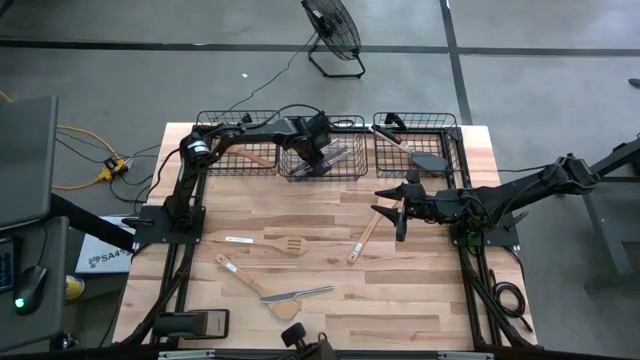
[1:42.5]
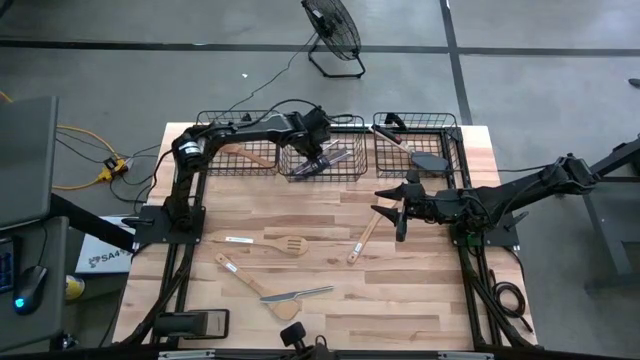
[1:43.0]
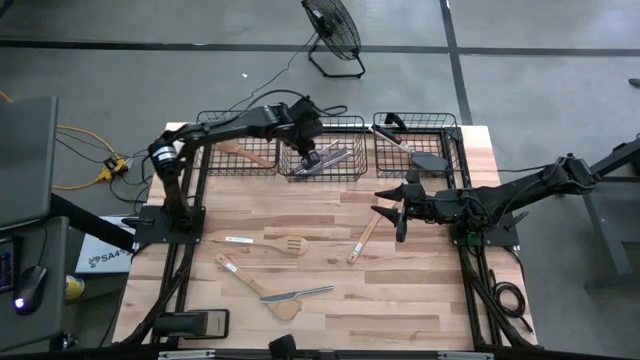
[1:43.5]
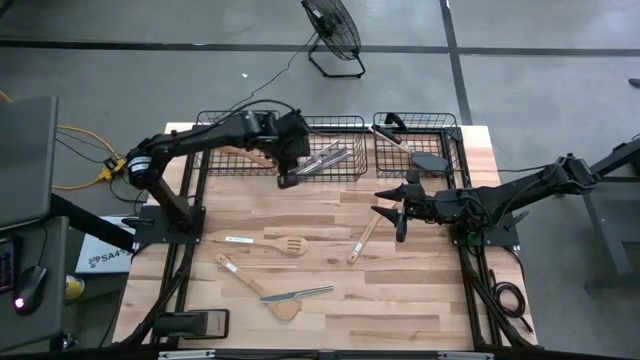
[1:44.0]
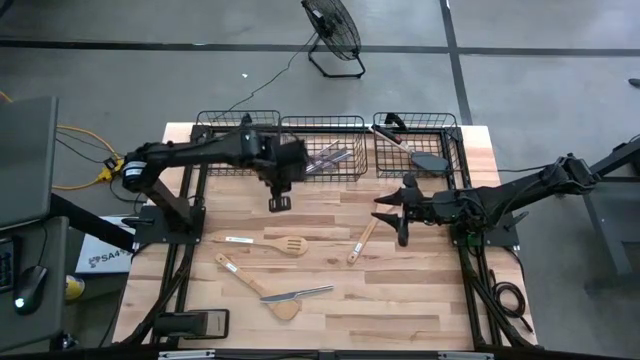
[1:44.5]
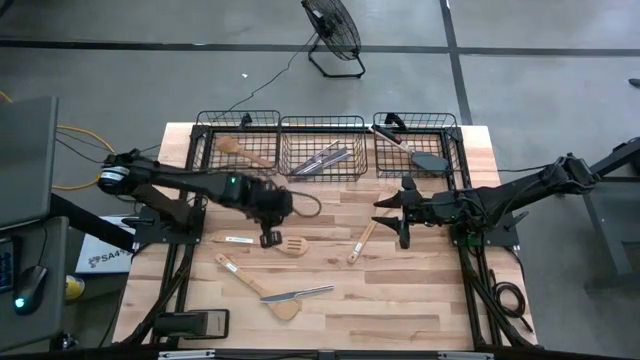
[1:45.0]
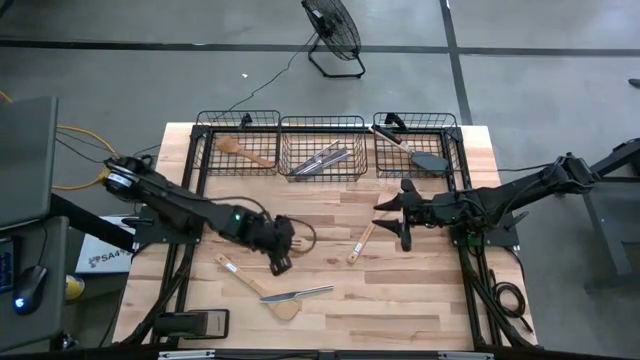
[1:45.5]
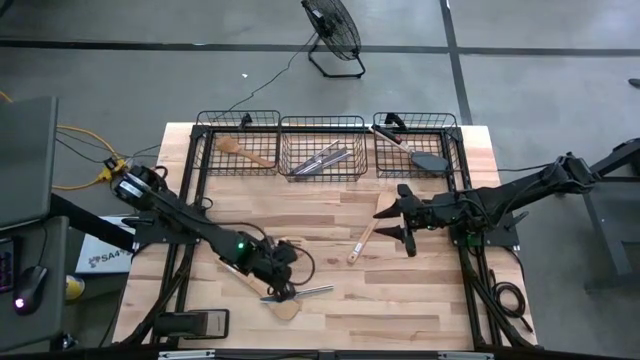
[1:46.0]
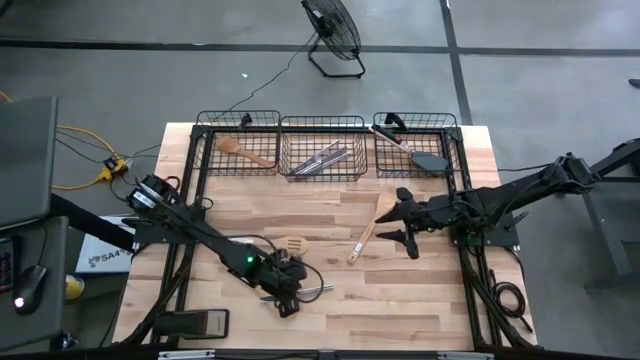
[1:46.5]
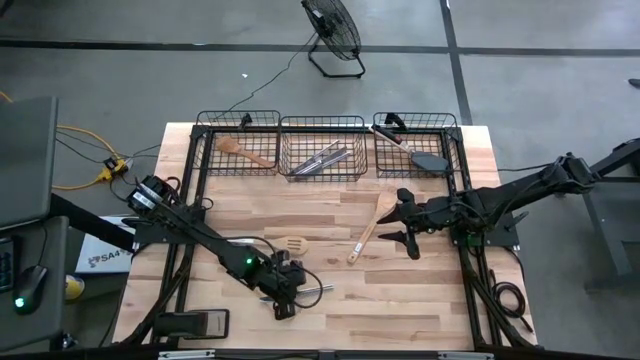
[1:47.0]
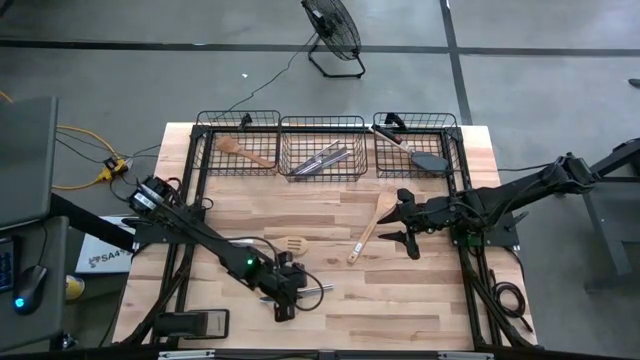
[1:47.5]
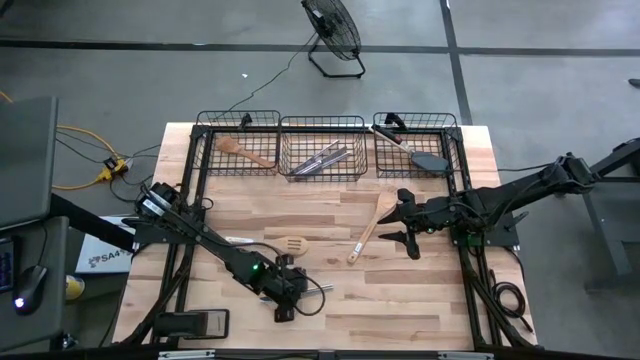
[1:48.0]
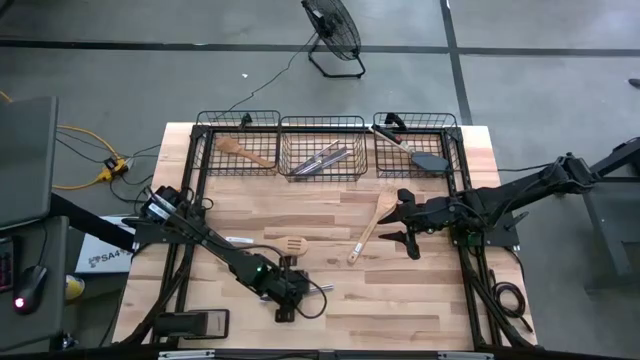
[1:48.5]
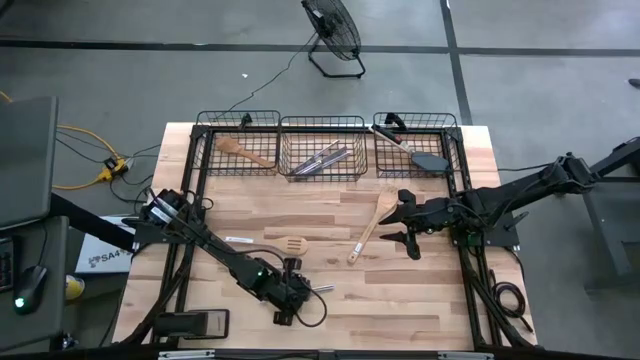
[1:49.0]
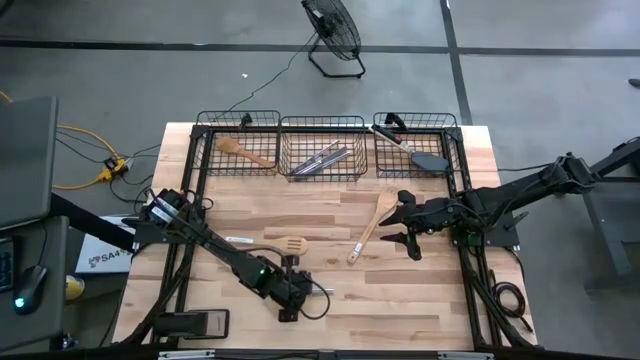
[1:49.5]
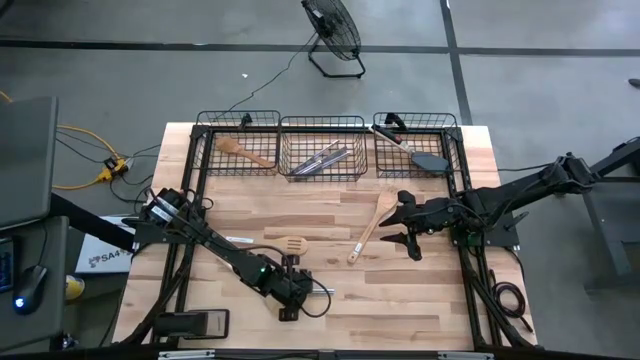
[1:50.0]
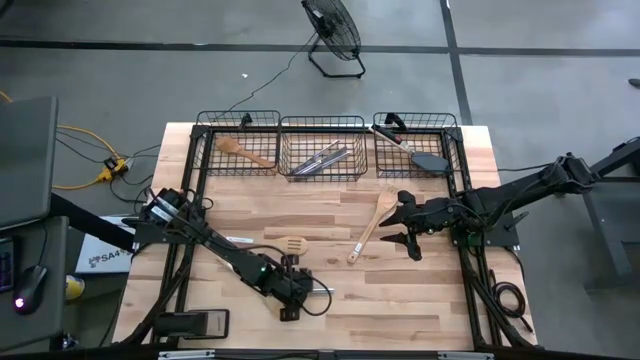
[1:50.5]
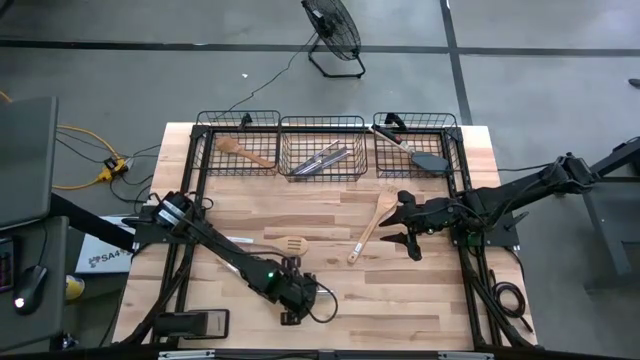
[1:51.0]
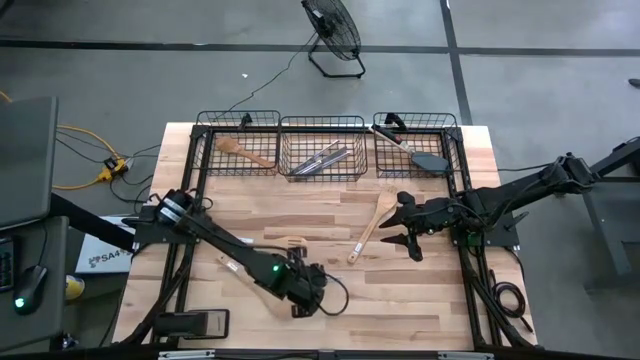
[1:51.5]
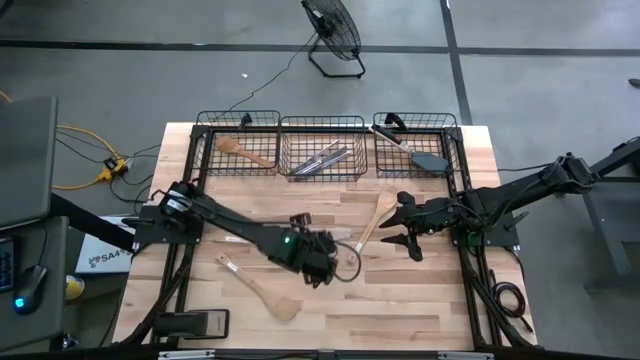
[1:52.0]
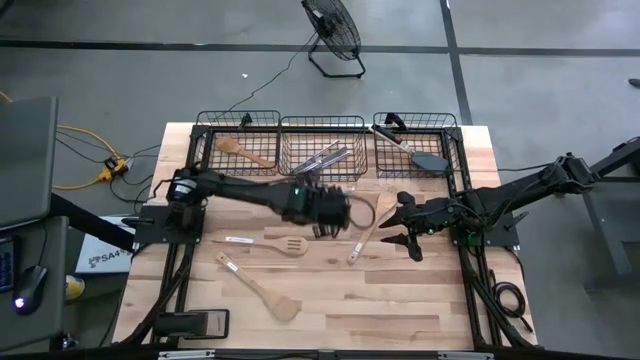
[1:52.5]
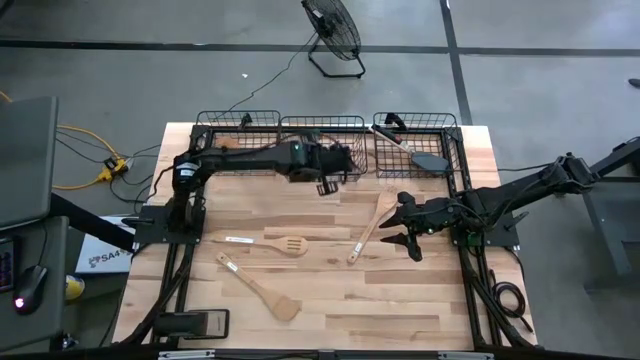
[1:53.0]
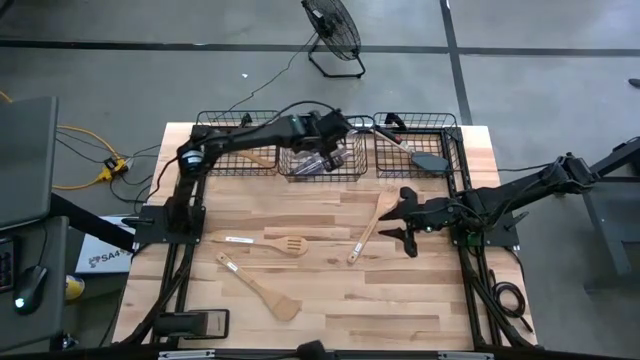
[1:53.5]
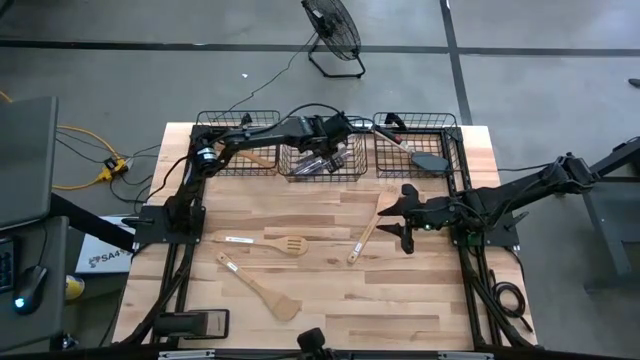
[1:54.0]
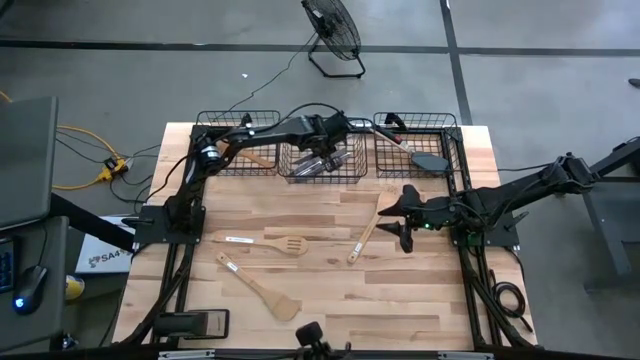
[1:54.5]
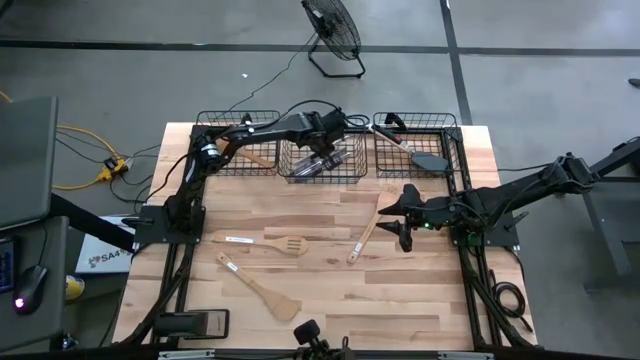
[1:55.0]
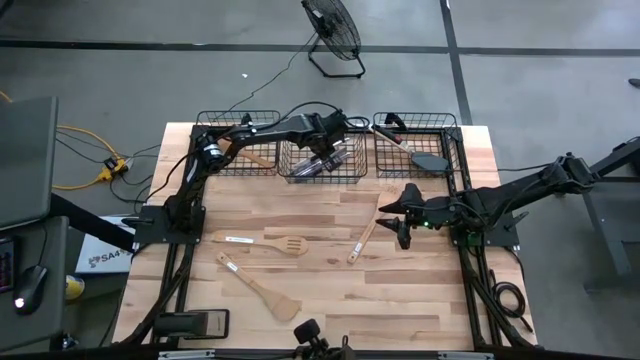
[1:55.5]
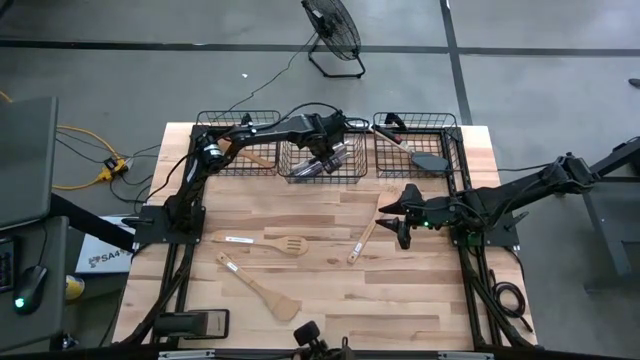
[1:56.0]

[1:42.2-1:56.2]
Task: Pick & Place Kitchen Items
Put the silver table knife into the middle mesh basket

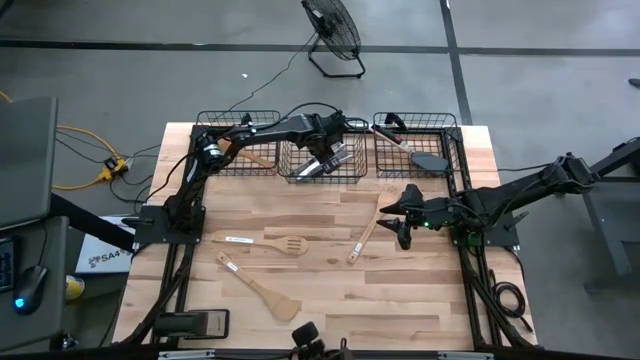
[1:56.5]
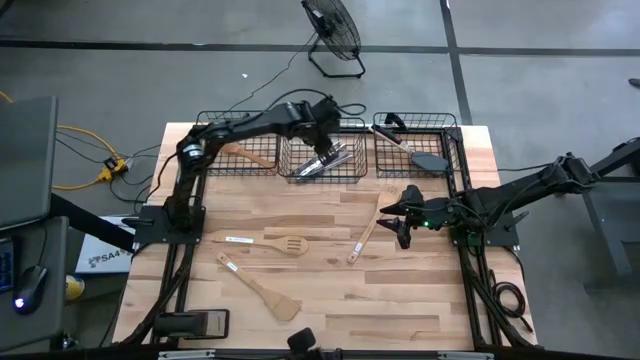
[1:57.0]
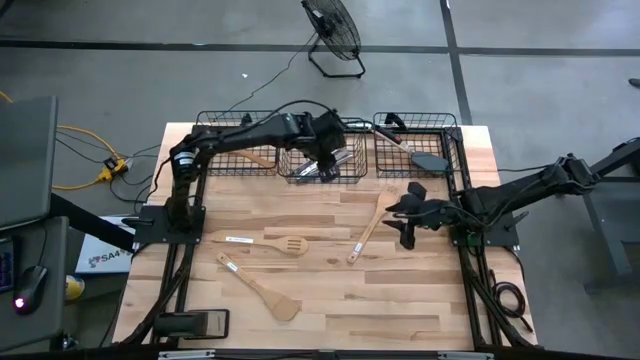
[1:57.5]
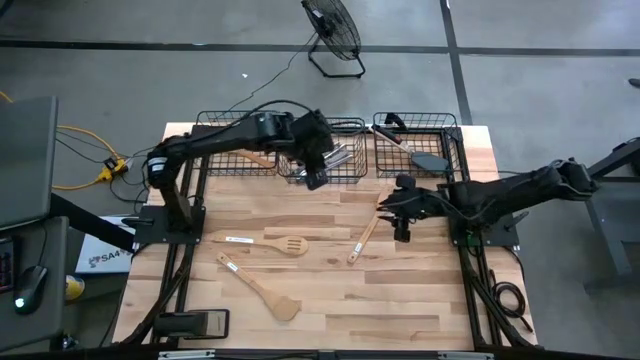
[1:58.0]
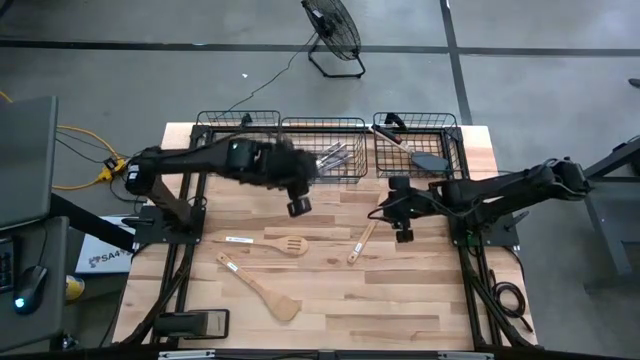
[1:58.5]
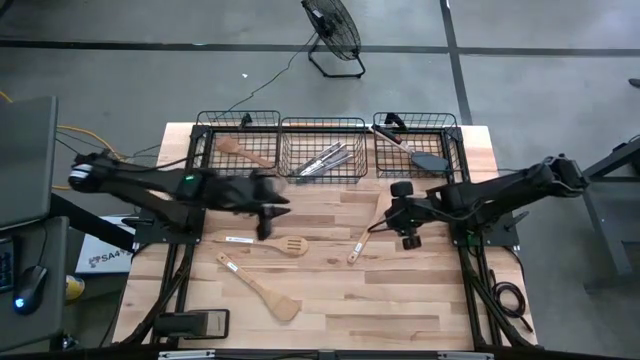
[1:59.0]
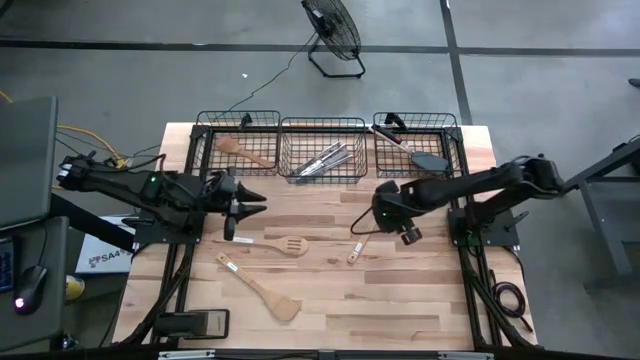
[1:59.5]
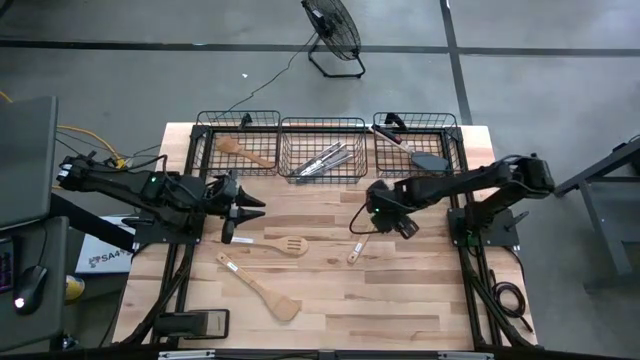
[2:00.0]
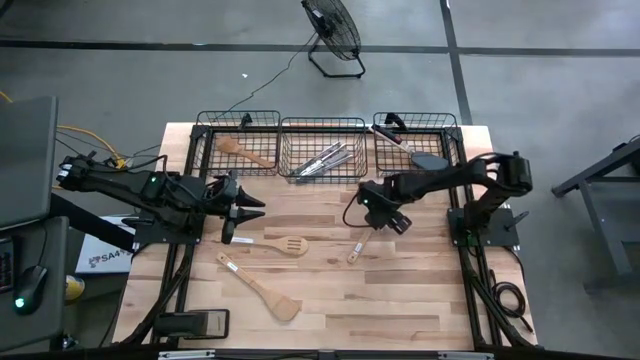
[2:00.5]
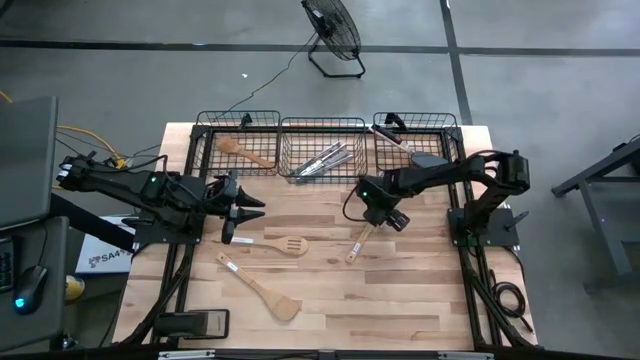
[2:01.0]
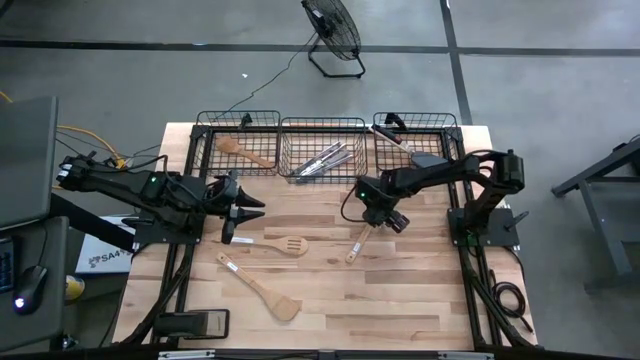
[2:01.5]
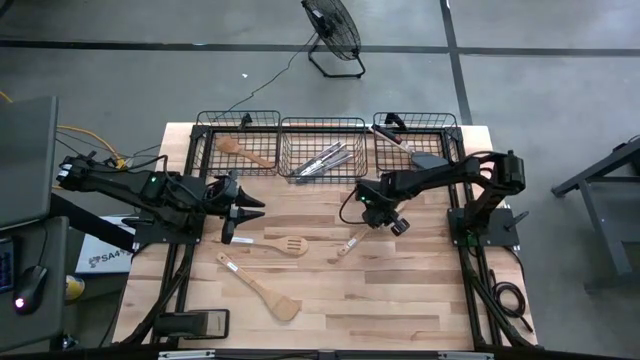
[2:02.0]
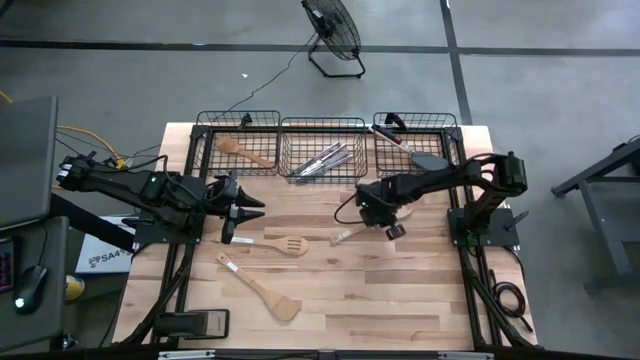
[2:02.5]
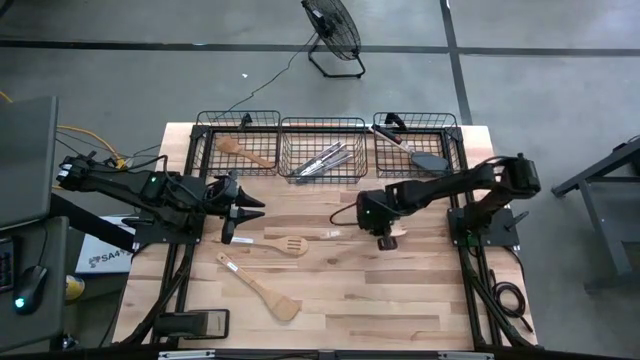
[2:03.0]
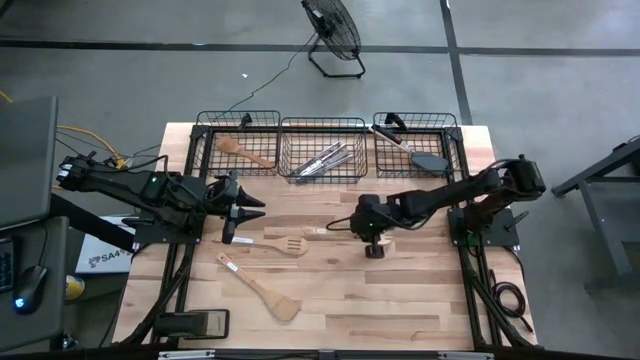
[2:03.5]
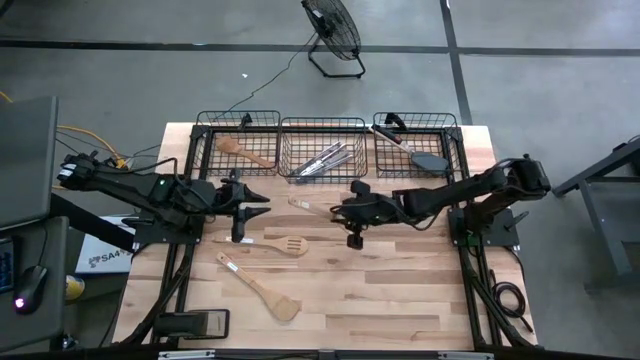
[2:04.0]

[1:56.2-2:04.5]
Put the brown serving spoon into the left mesh basket
